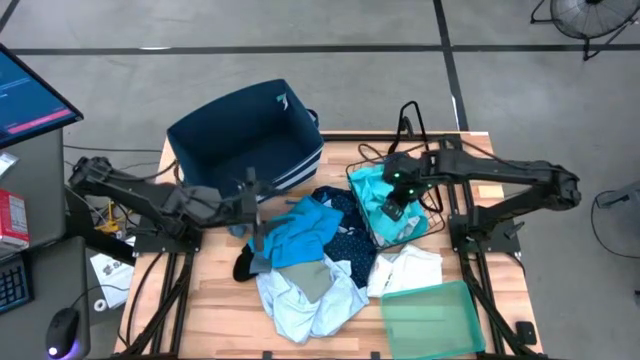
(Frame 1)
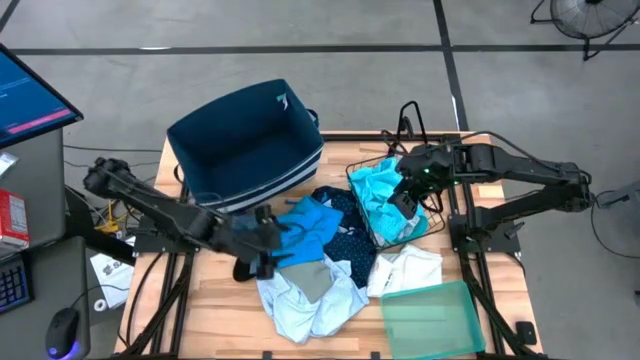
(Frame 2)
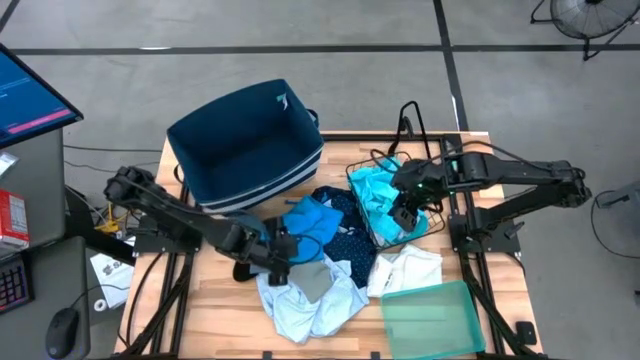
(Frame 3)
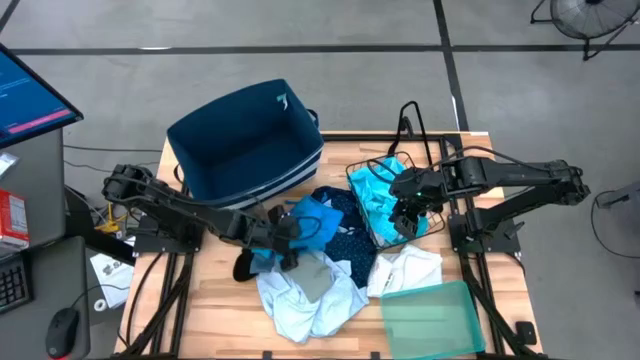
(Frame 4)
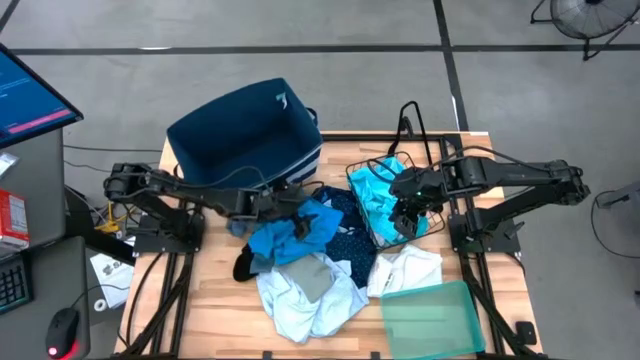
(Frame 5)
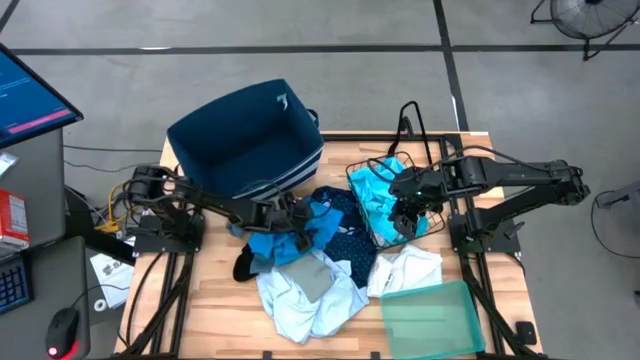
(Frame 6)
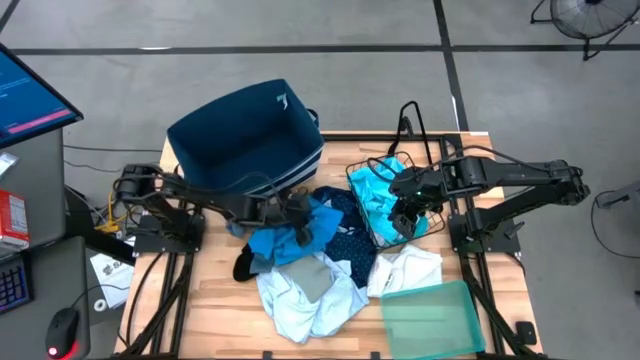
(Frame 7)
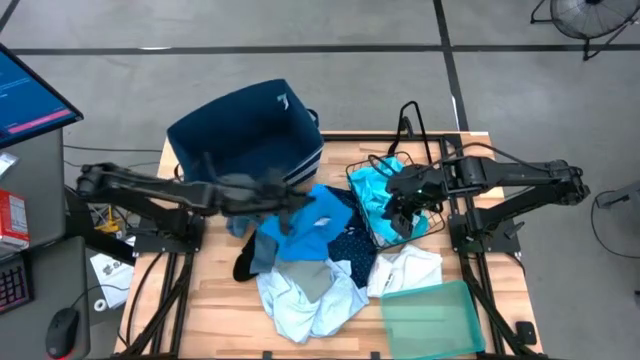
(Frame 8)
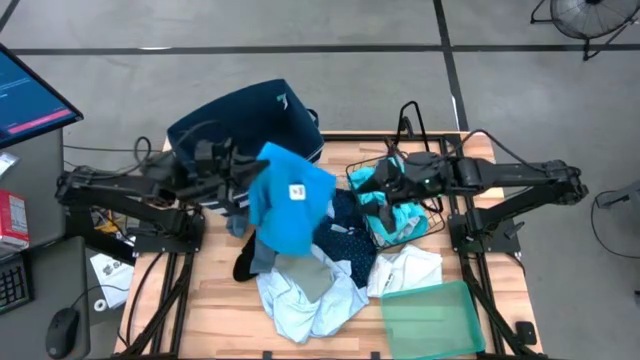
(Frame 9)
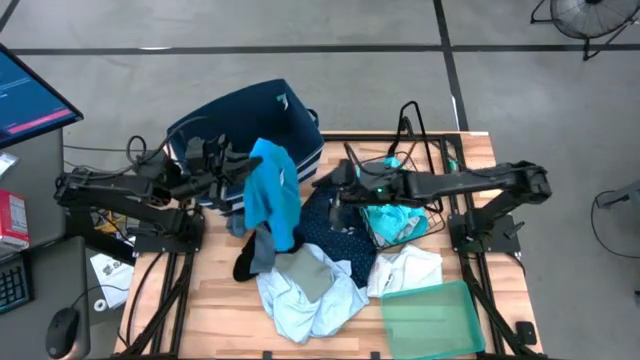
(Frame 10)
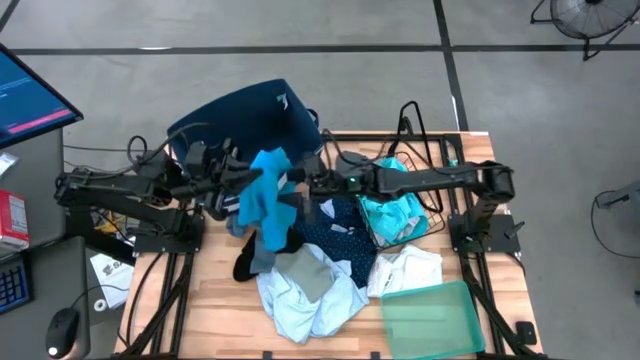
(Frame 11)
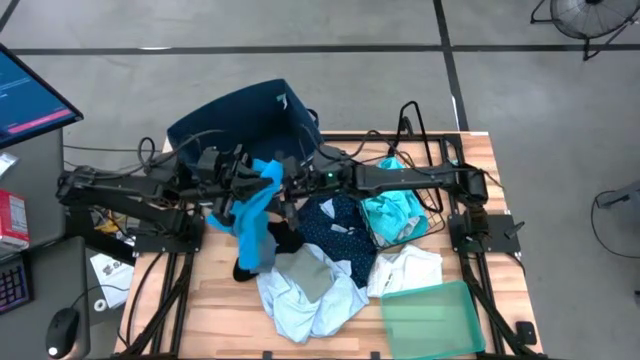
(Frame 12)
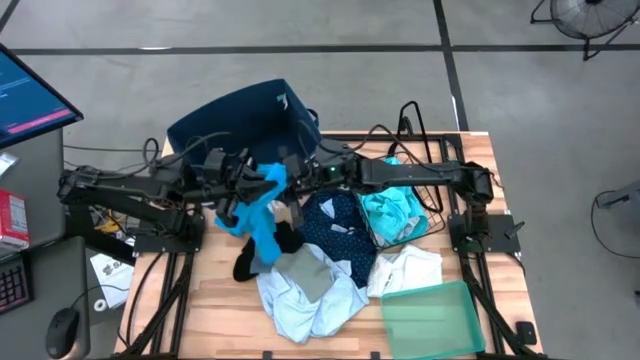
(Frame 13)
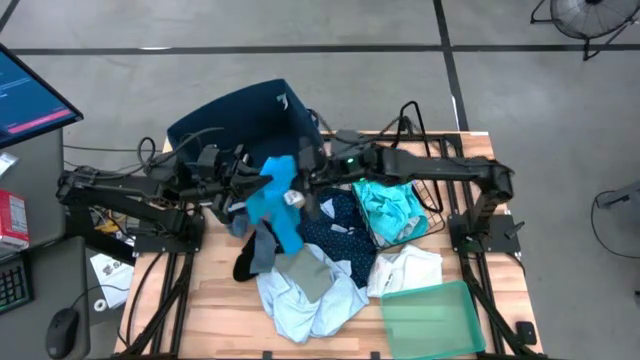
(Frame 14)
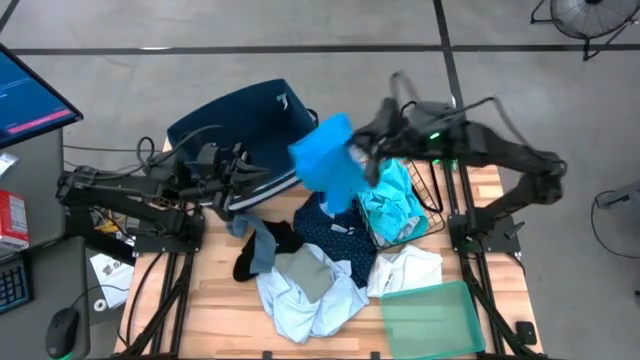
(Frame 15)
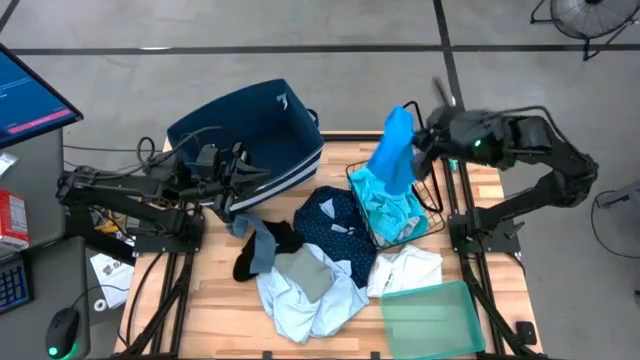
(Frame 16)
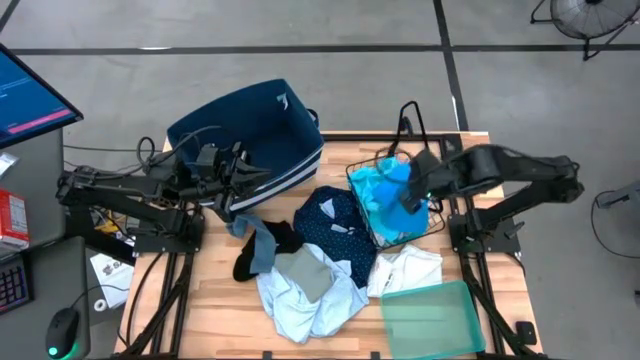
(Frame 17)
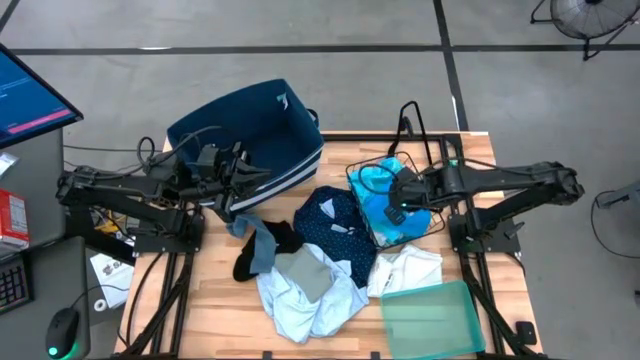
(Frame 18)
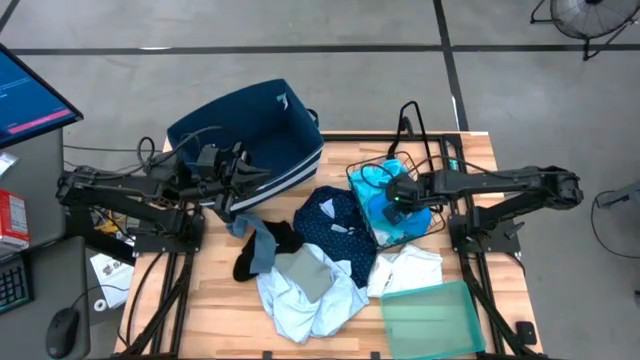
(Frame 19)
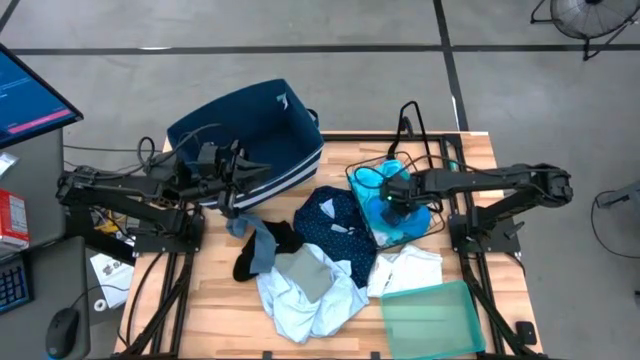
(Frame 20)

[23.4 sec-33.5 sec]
Task: Pick & Place Cloths
Put the blue shorts into the wire basket

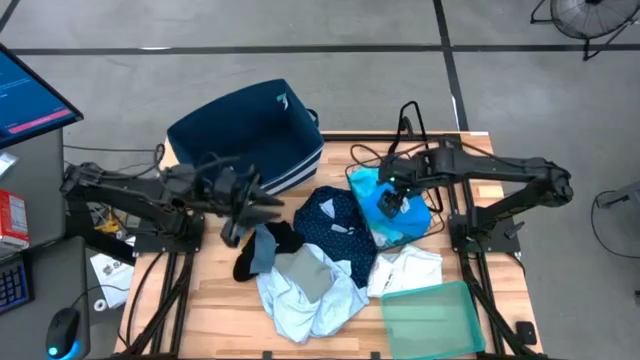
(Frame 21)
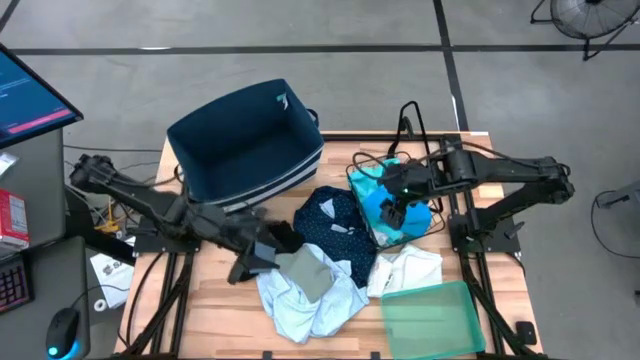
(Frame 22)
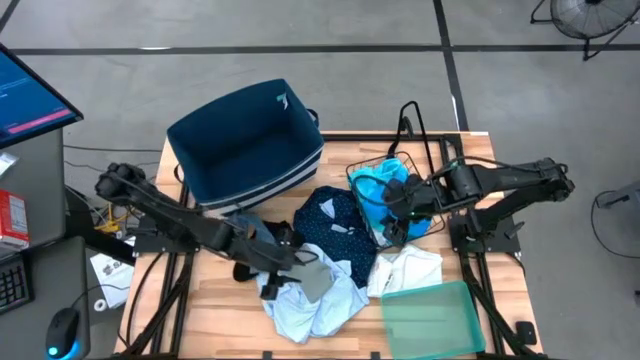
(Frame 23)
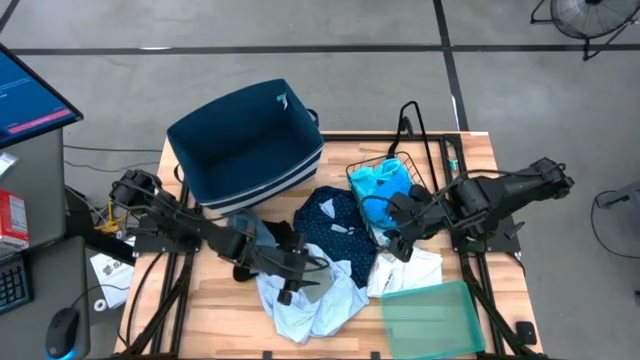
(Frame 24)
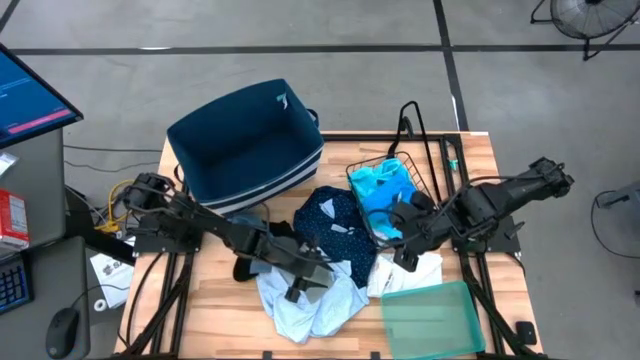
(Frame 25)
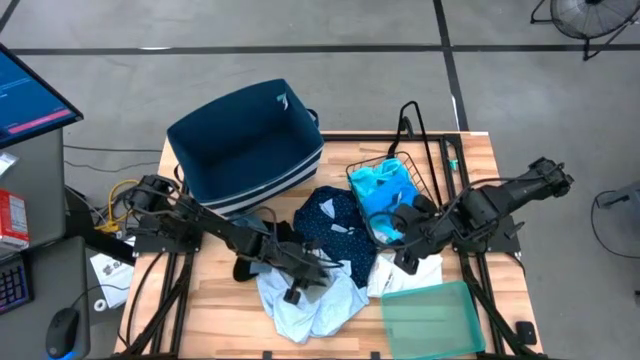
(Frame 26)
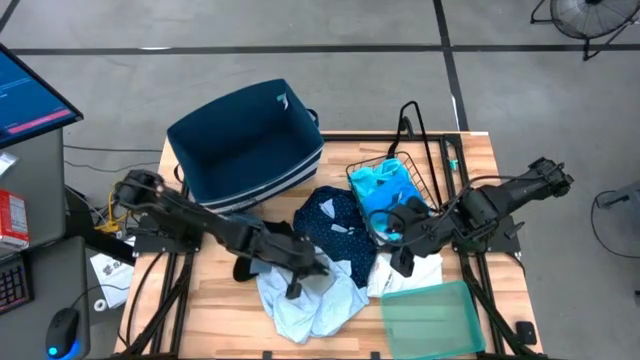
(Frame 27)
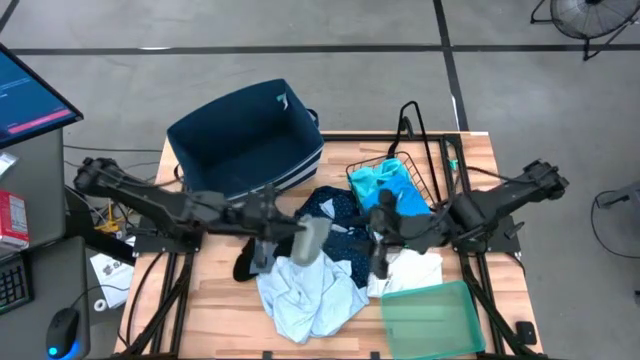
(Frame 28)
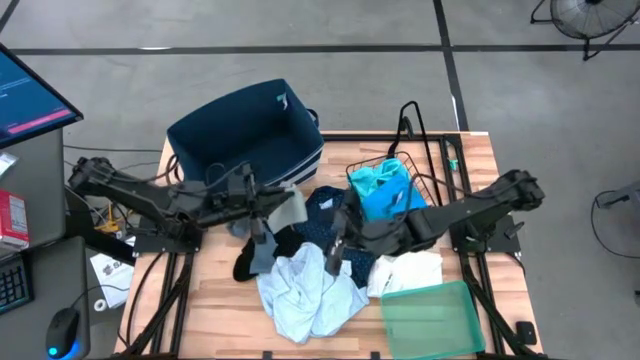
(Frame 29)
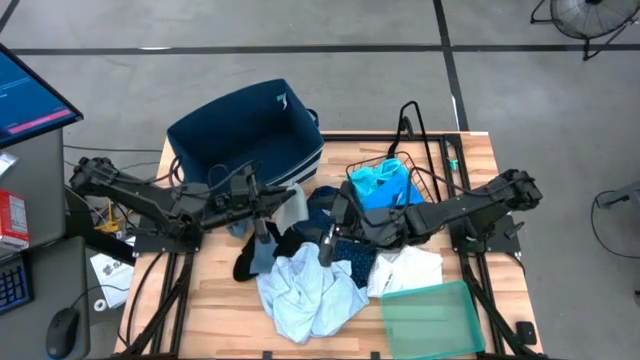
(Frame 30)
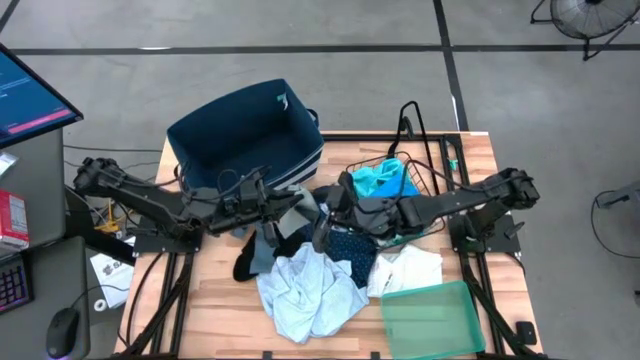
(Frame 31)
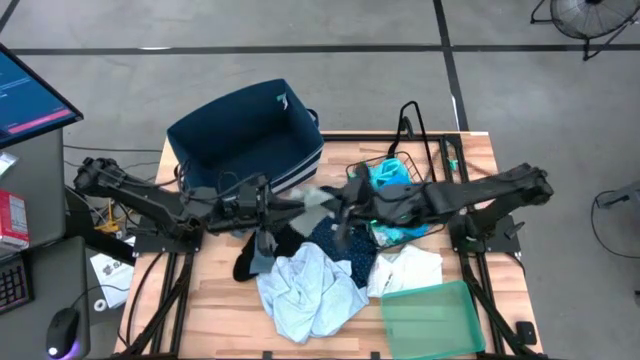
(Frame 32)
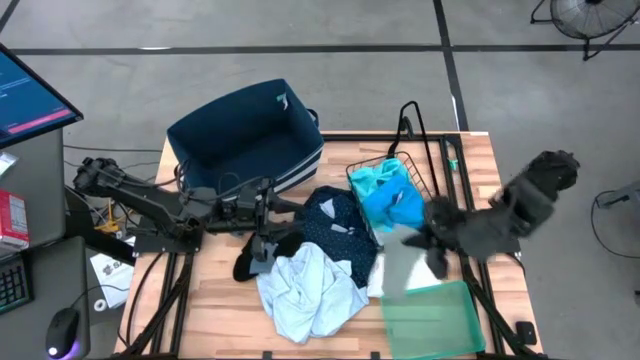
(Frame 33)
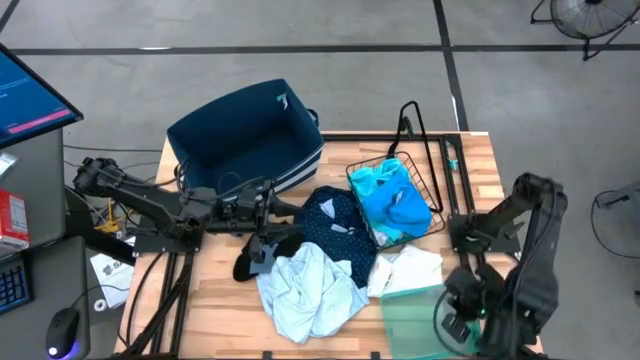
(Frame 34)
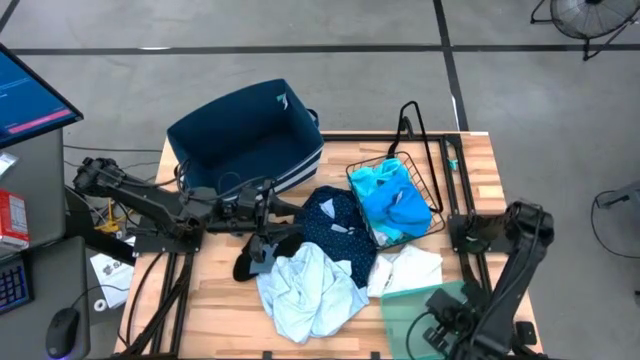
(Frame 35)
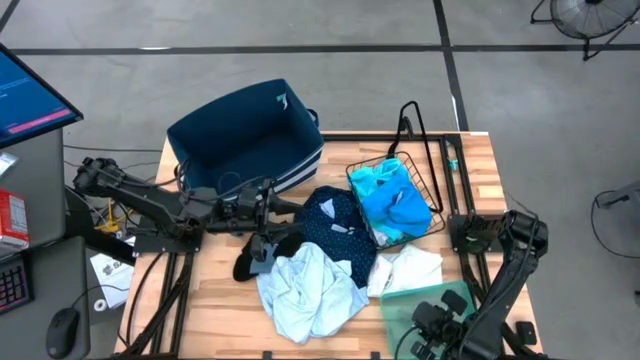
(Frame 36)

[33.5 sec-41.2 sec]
Put the gray sock into the green bin

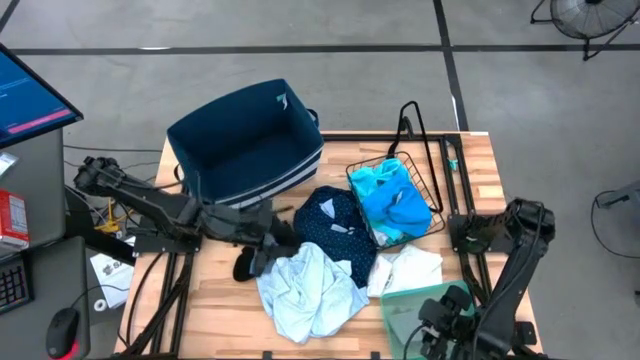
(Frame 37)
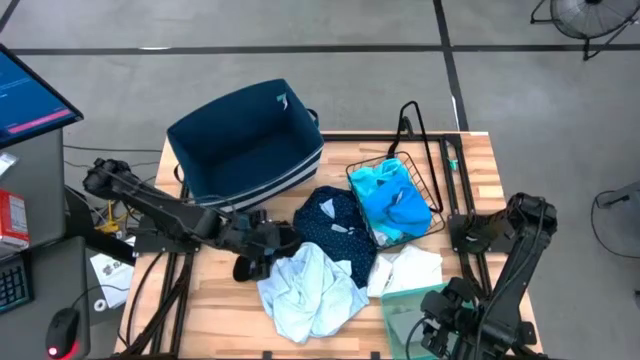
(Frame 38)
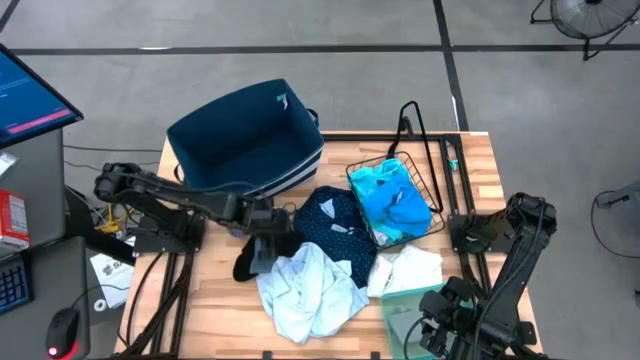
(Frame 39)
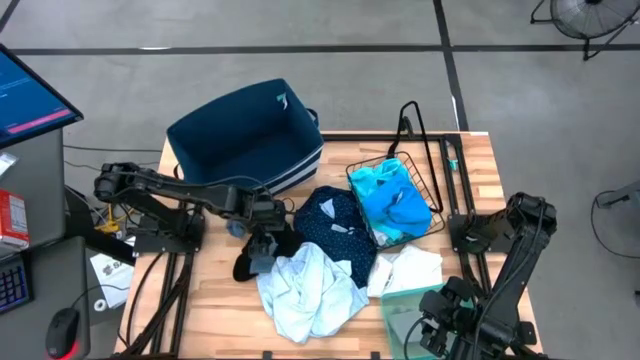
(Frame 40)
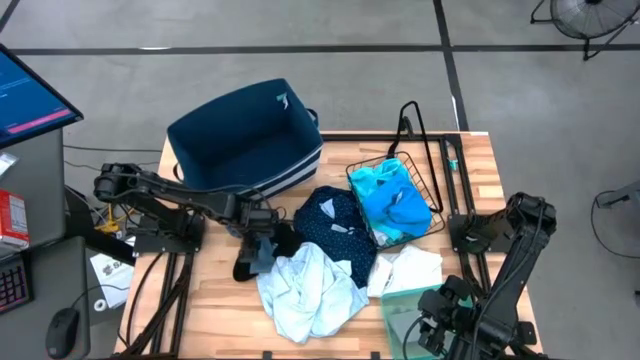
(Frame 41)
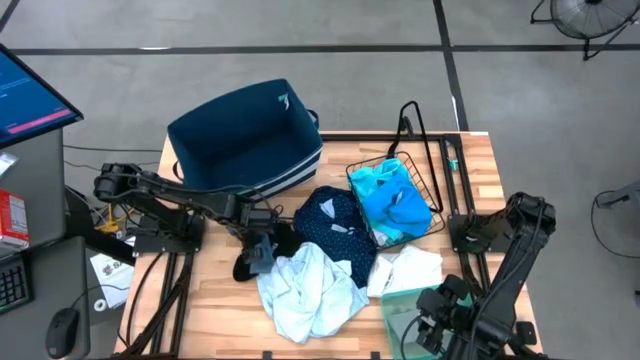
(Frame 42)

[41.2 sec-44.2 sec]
Put the blue sock into the green bin
